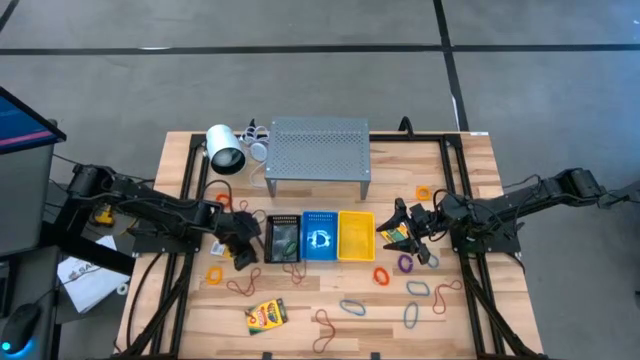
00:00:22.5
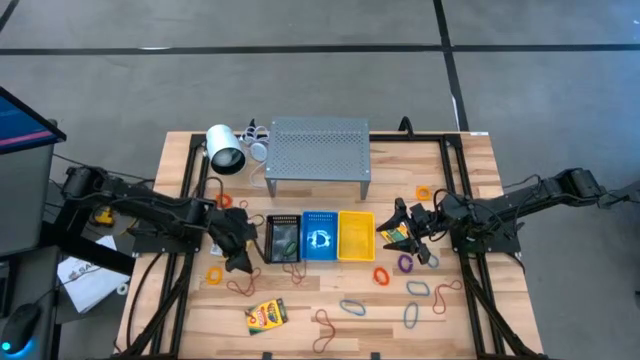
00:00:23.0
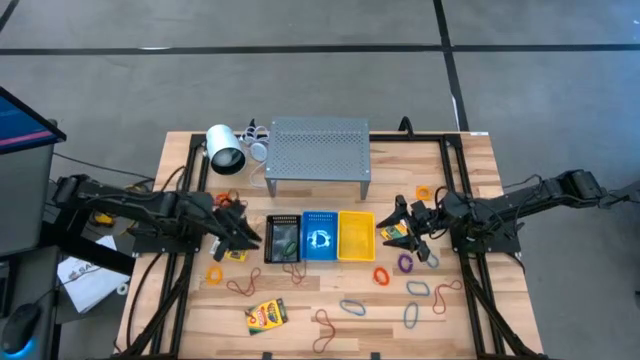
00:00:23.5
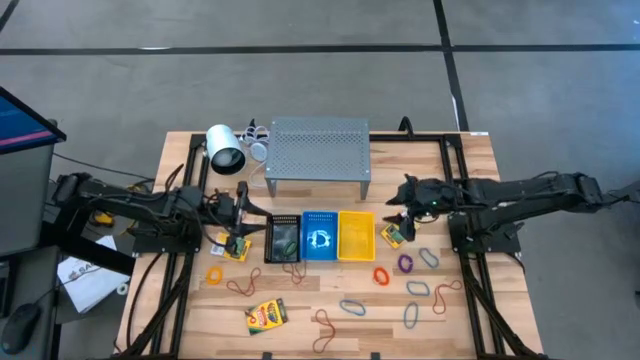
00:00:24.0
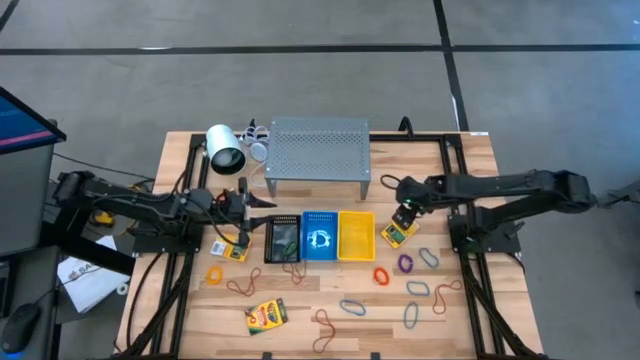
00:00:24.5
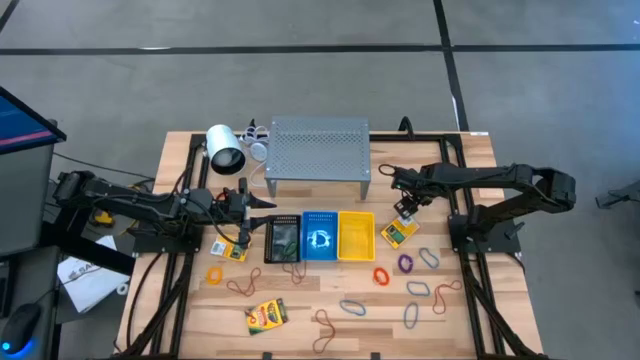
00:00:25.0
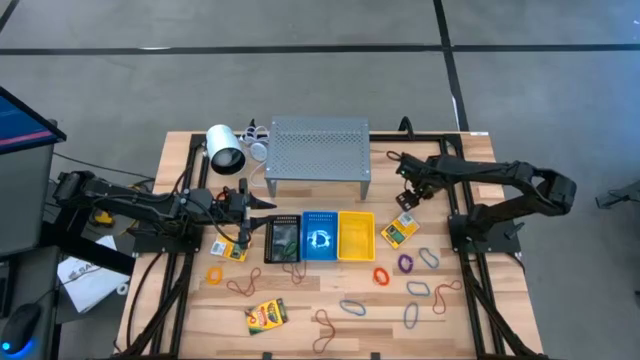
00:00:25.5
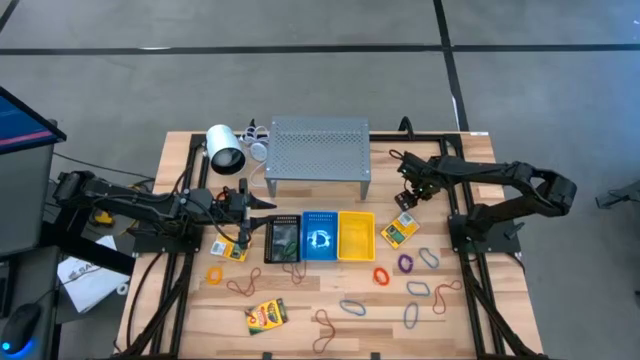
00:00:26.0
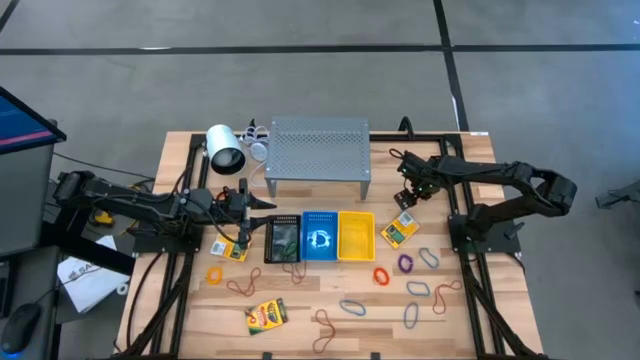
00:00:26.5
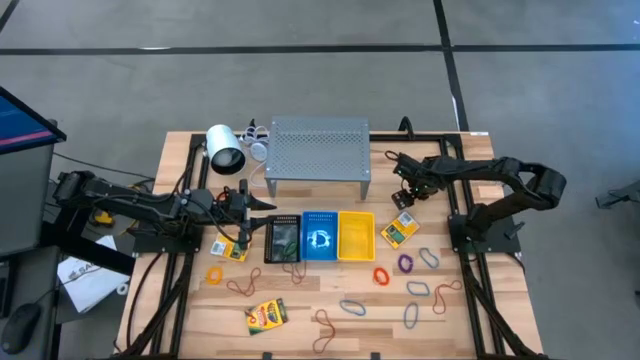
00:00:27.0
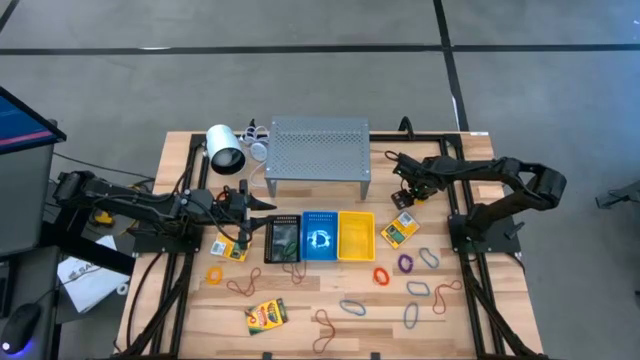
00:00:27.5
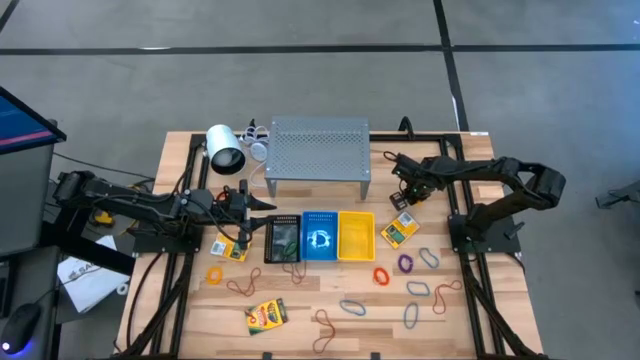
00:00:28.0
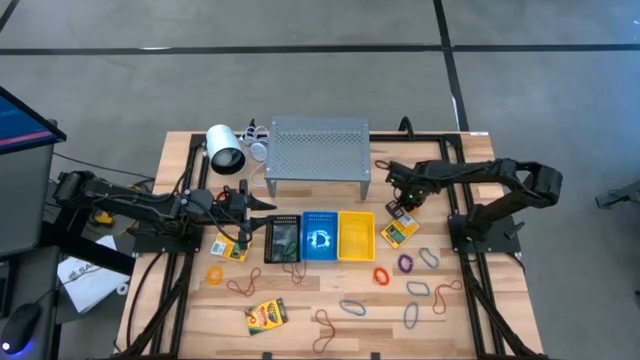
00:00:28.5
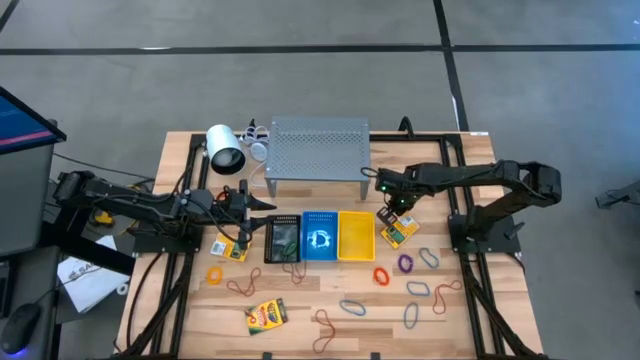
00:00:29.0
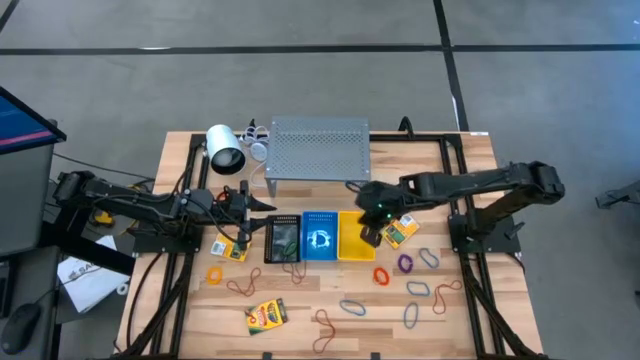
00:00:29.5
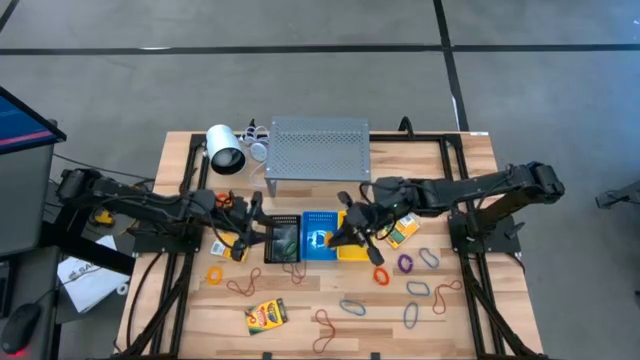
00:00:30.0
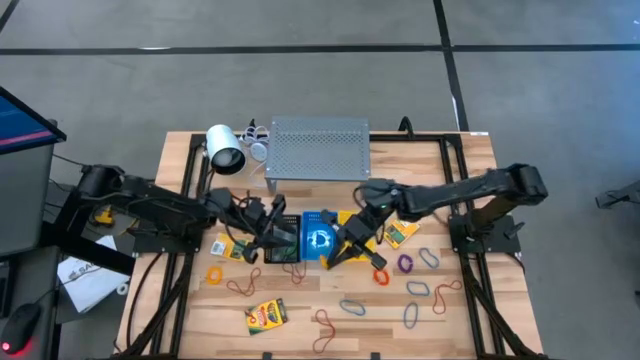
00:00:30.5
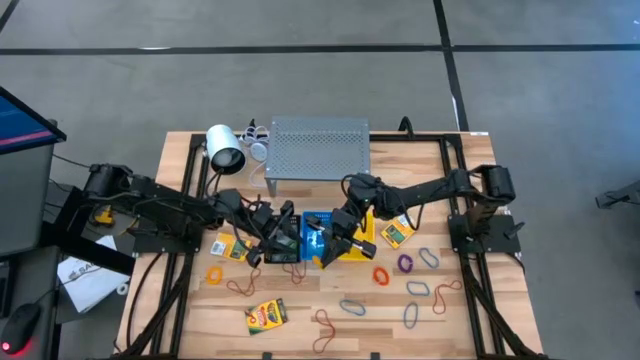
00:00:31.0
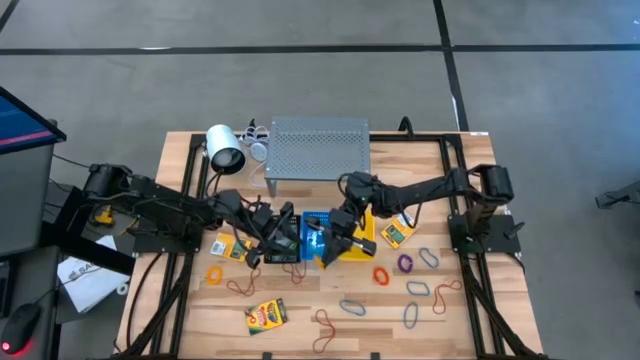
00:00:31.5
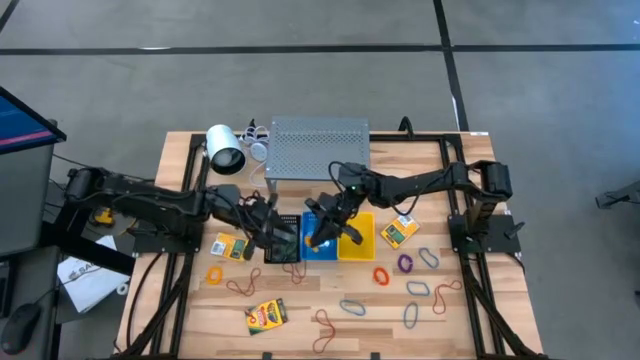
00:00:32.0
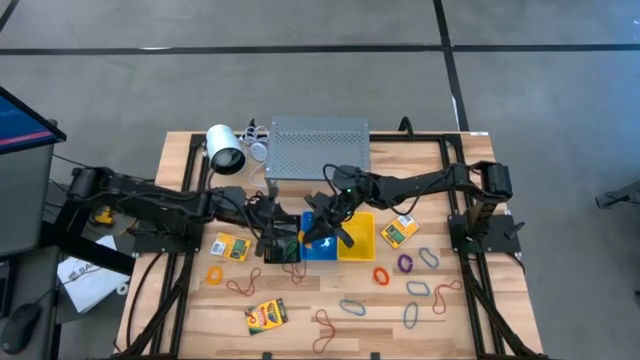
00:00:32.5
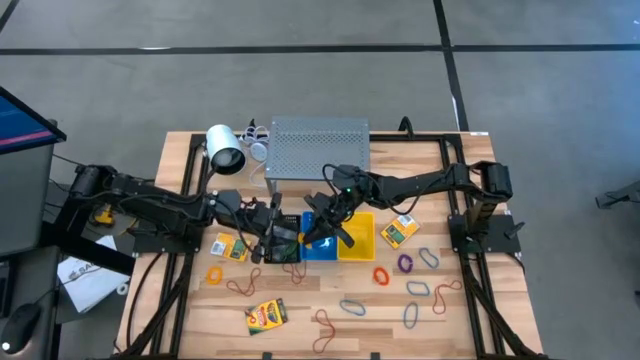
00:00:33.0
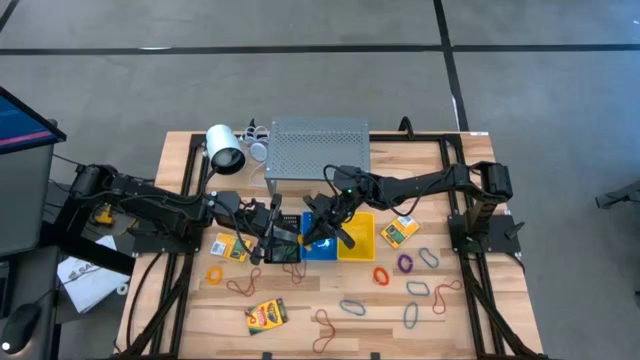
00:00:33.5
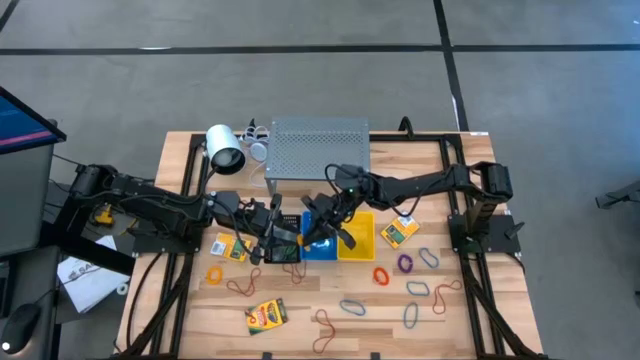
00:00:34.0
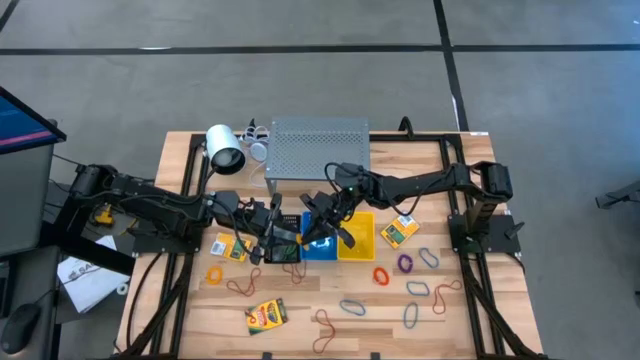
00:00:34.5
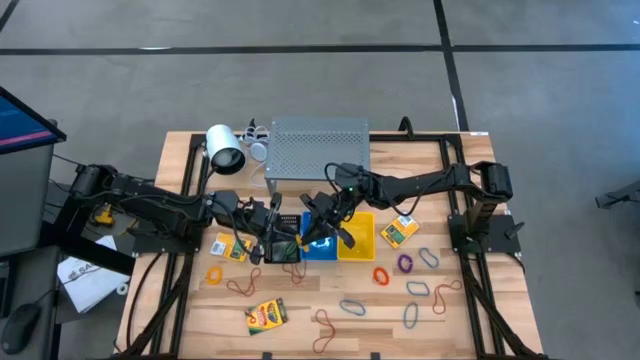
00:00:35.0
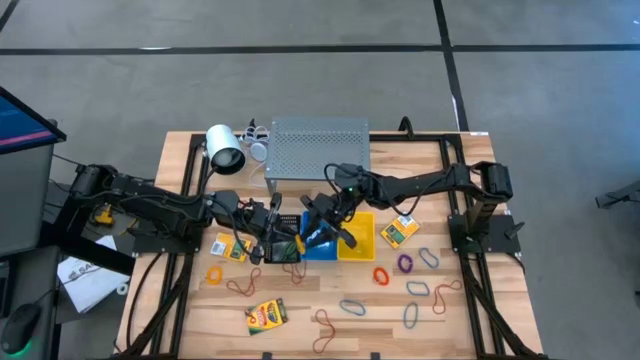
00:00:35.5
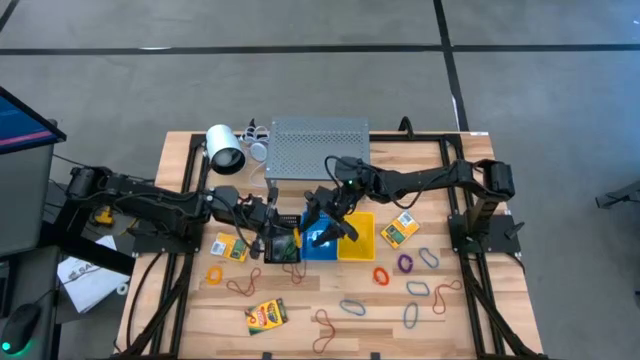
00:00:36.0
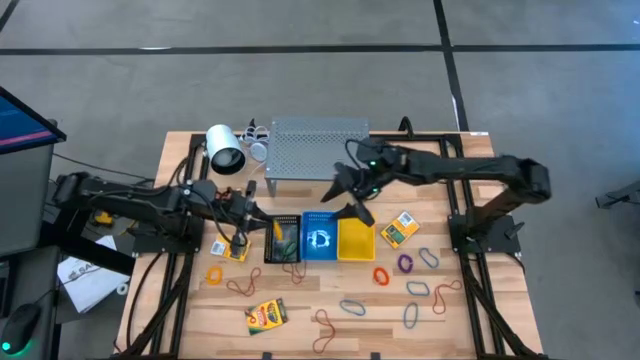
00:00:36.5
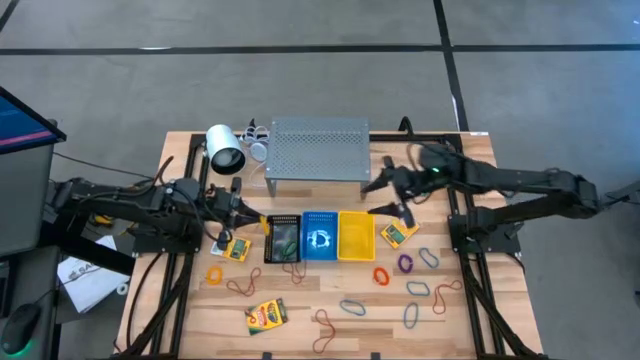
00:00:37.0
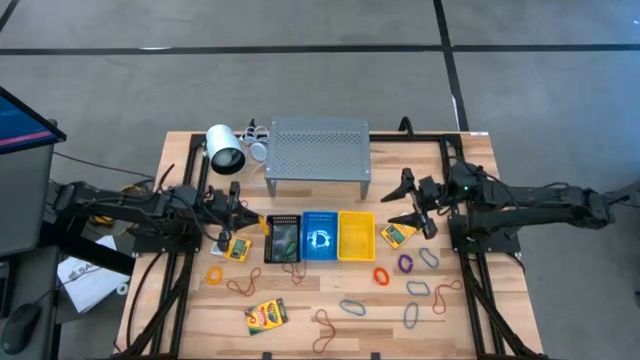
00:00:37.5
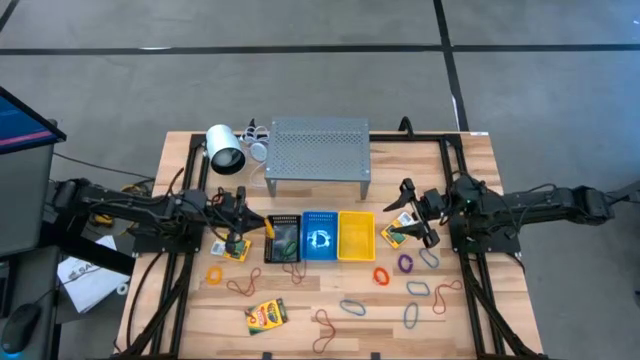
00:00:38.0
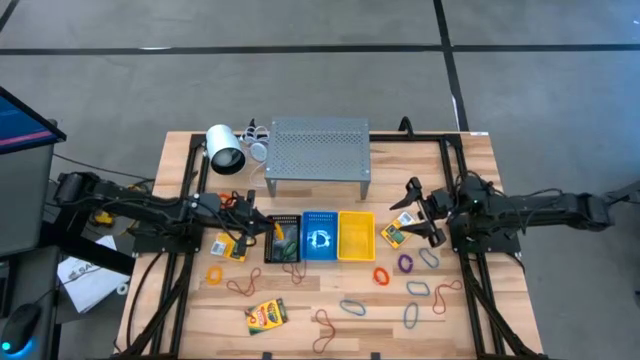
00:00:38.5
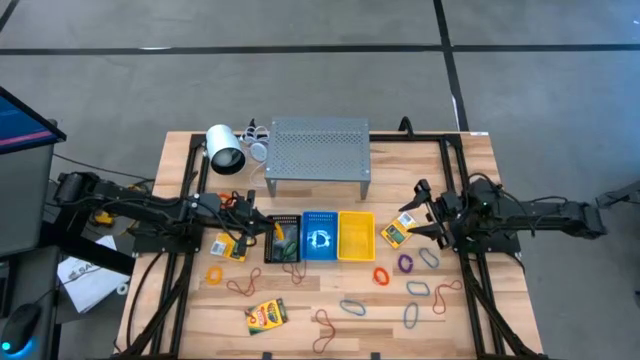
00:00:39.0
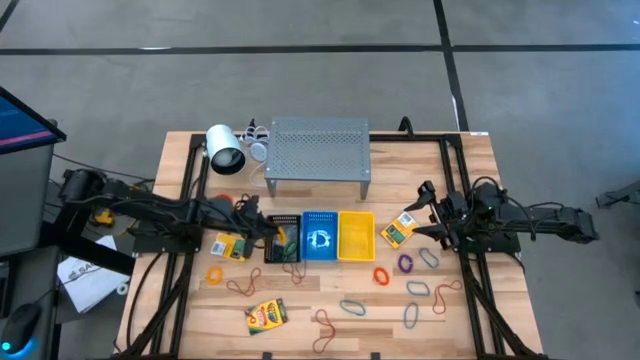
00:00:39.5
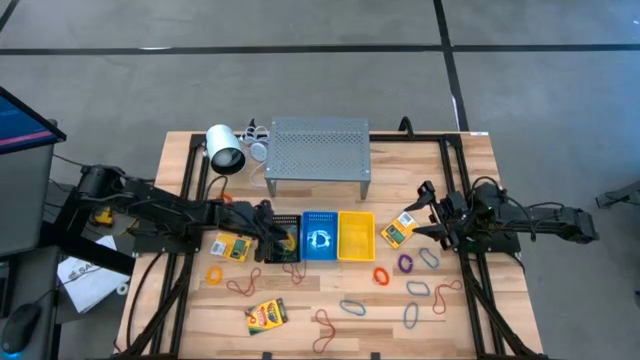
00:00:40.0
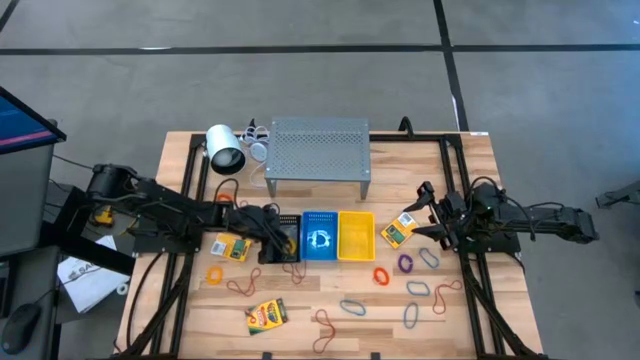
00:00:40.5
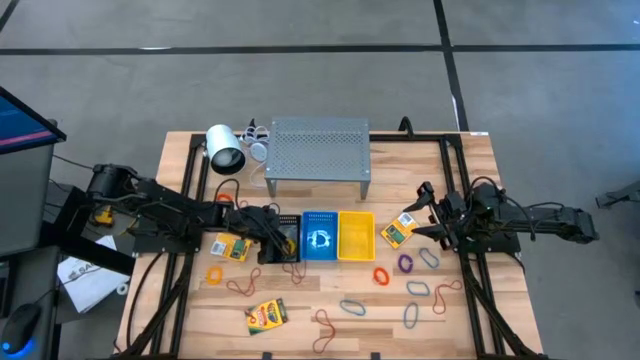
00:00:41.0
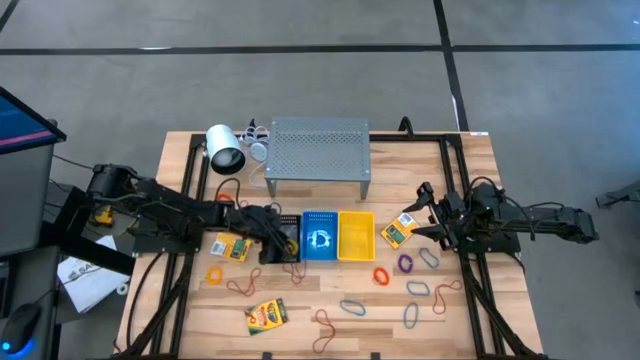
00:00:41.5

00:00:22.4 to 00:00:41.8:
Task: Pick & Place Office Desk Supplies
Put the yellow spring keychain into the black basket

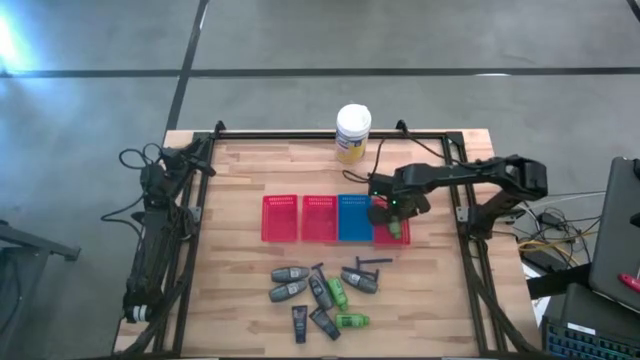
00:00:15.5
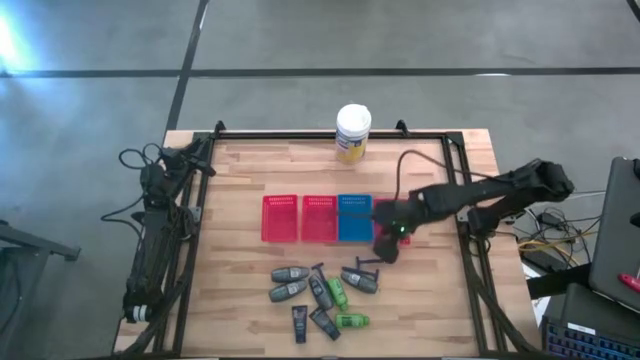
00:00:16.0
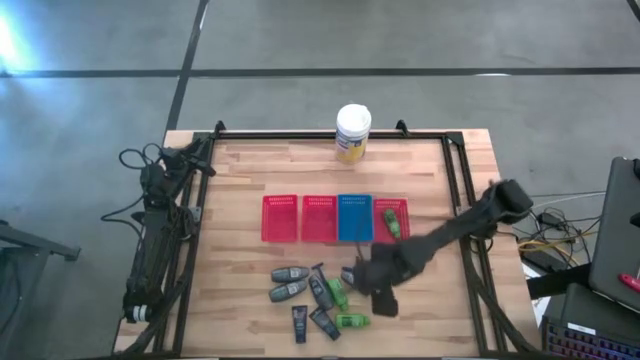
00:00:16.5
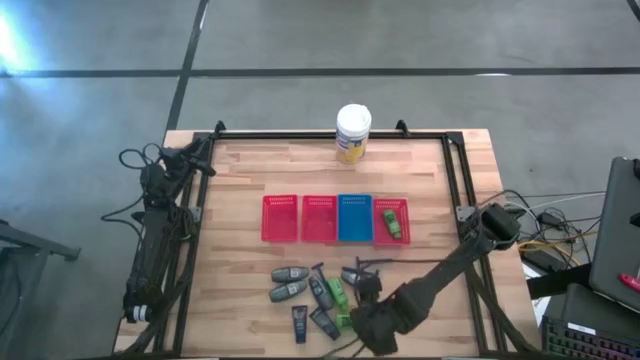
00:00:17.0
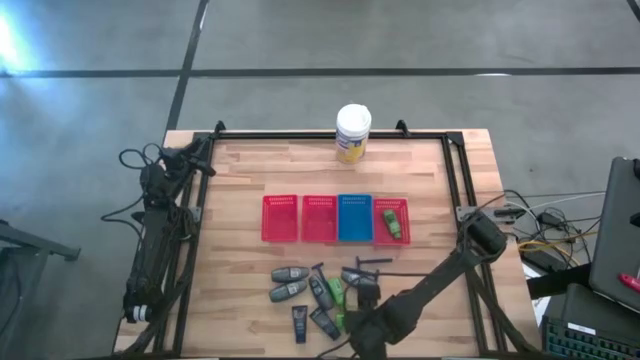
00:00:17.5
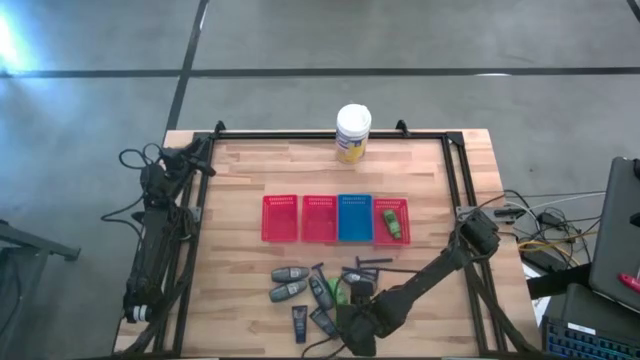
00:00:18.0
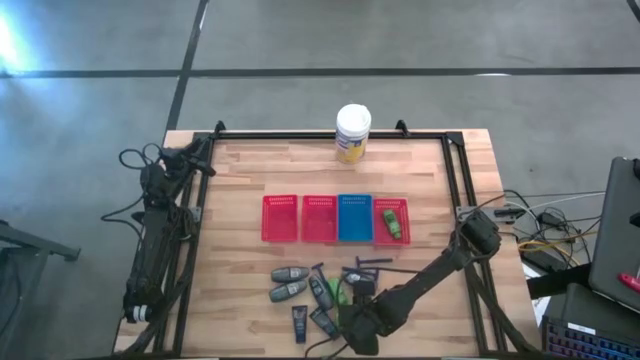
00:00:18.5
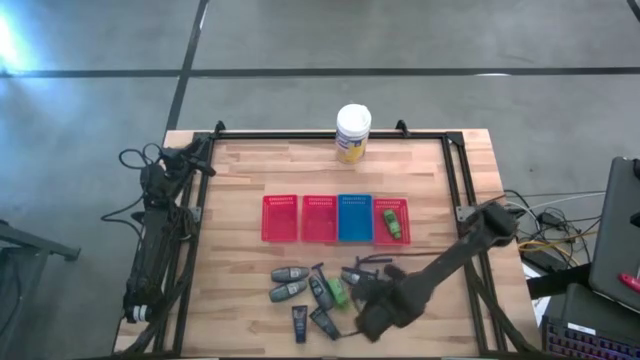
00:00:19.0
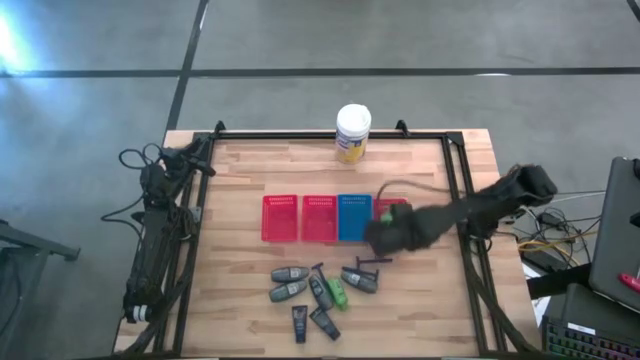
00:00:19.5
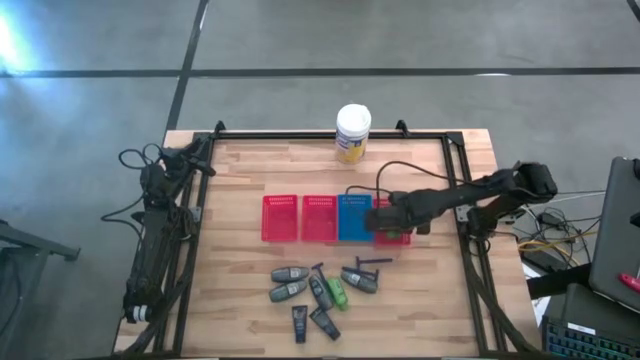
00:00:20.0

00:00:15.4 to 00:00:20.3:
Task: Pick & Place Travel size toiletries
Put the green shampoo into the right red bin
